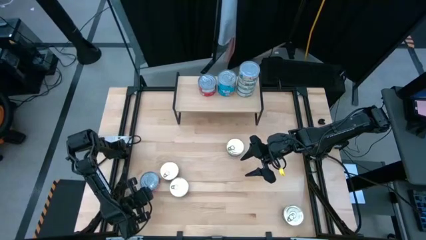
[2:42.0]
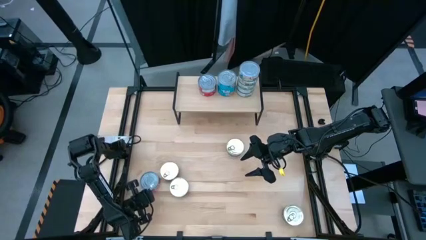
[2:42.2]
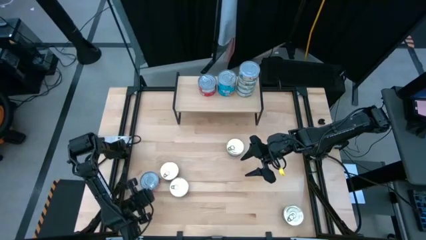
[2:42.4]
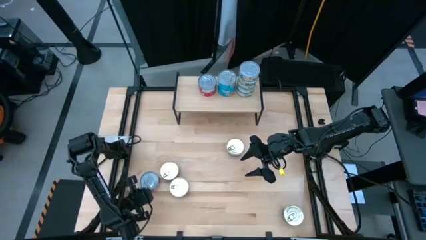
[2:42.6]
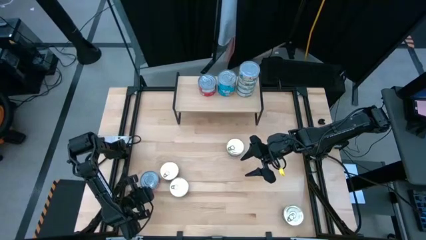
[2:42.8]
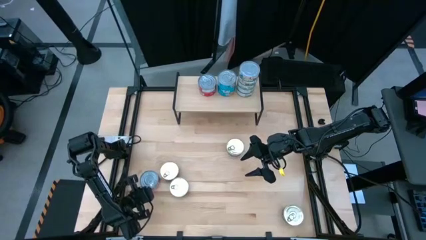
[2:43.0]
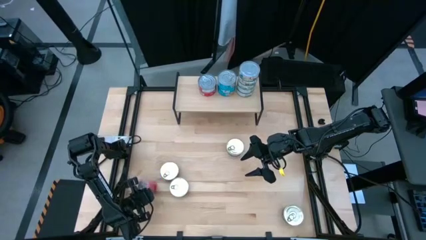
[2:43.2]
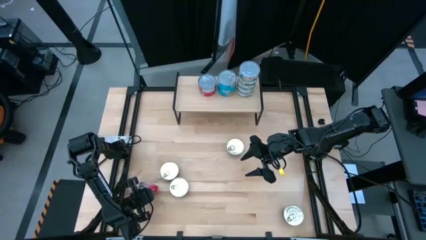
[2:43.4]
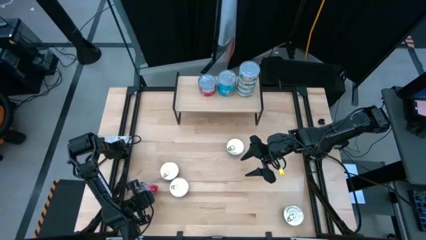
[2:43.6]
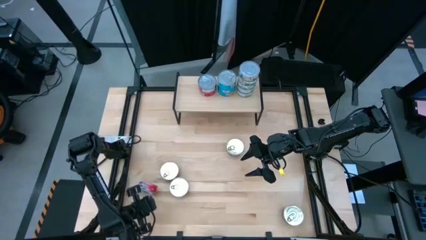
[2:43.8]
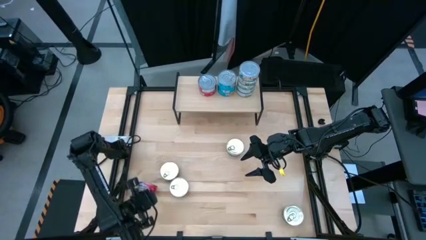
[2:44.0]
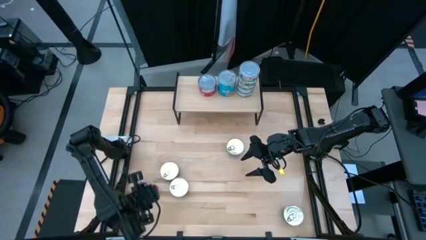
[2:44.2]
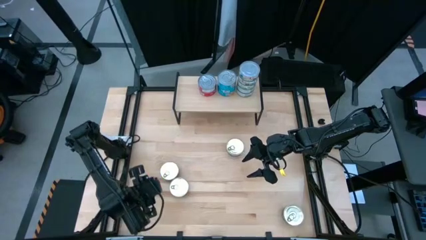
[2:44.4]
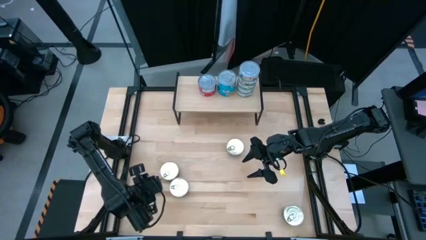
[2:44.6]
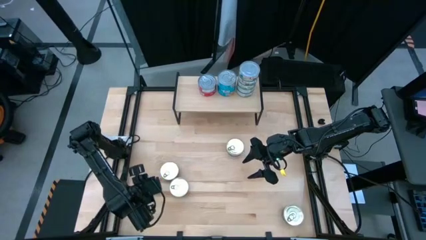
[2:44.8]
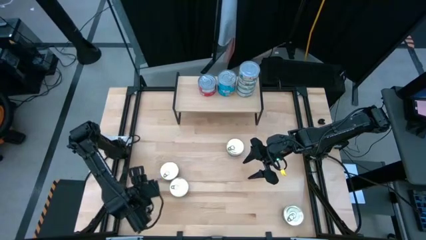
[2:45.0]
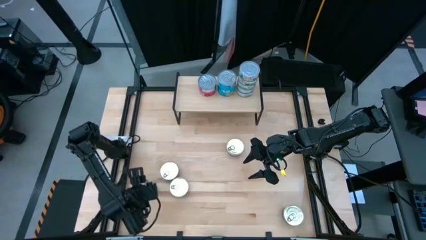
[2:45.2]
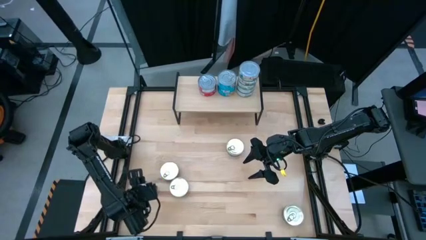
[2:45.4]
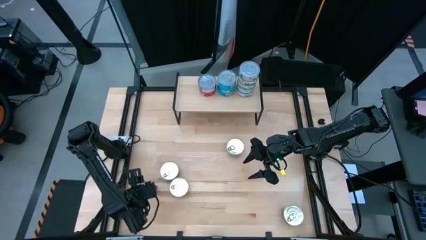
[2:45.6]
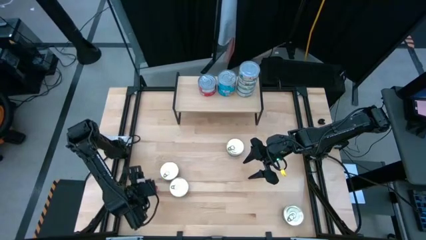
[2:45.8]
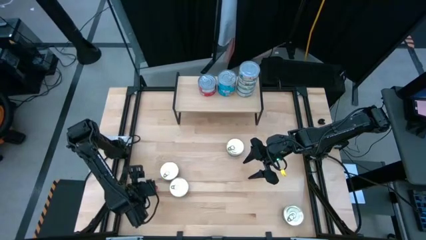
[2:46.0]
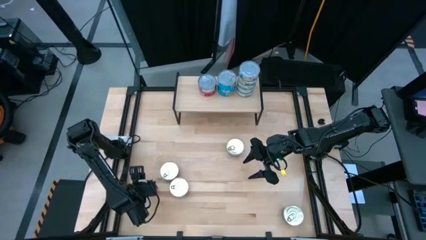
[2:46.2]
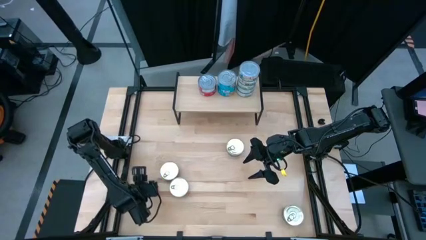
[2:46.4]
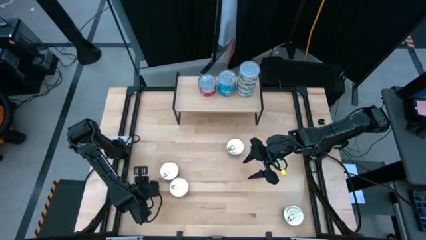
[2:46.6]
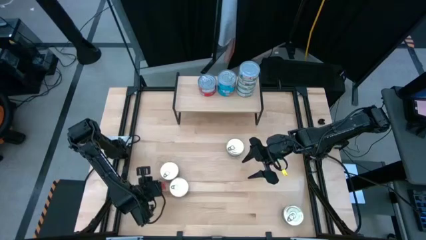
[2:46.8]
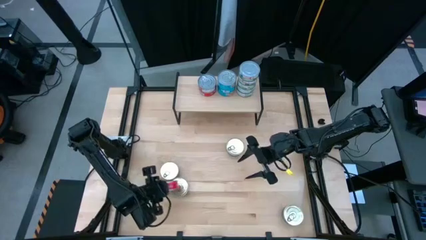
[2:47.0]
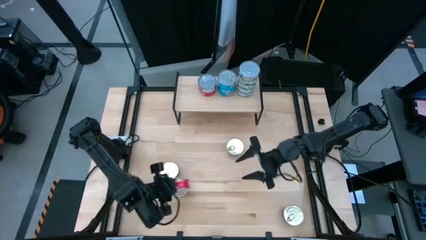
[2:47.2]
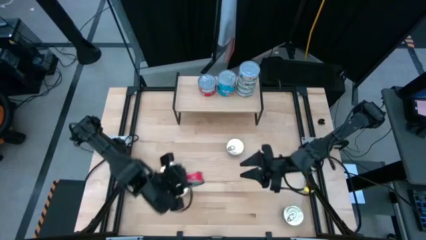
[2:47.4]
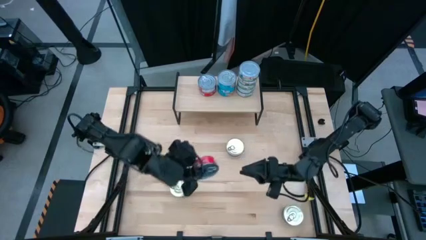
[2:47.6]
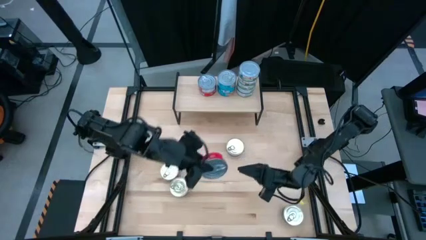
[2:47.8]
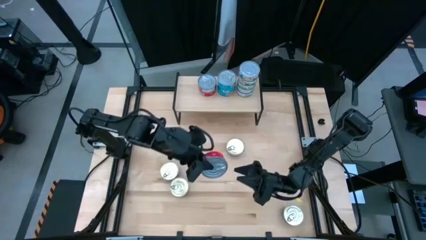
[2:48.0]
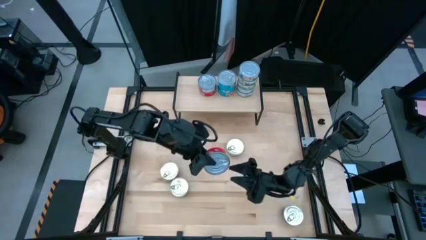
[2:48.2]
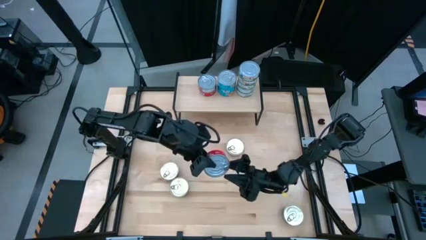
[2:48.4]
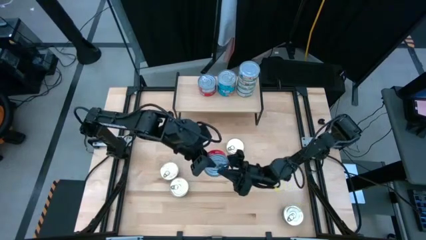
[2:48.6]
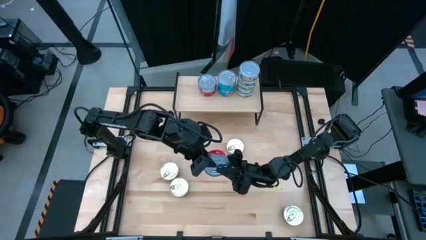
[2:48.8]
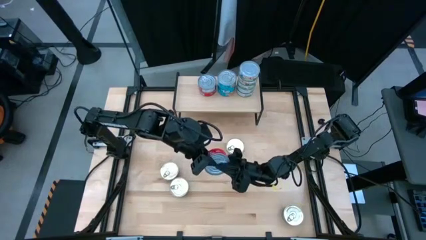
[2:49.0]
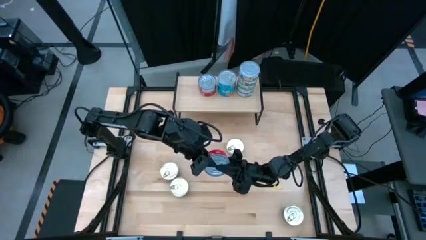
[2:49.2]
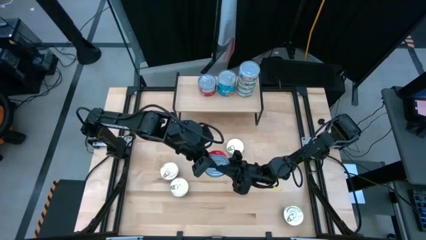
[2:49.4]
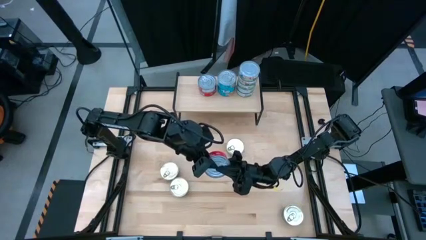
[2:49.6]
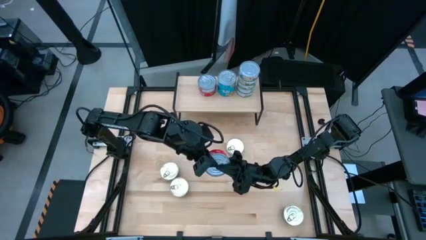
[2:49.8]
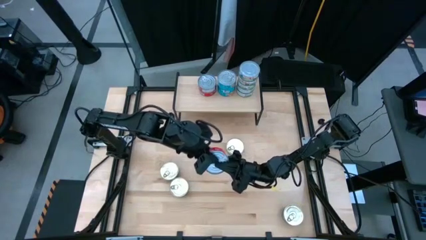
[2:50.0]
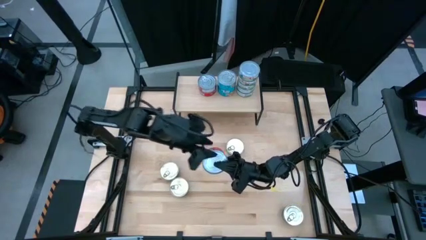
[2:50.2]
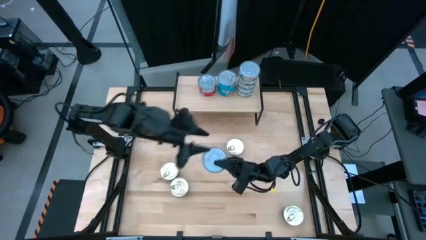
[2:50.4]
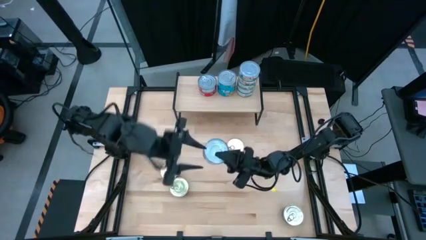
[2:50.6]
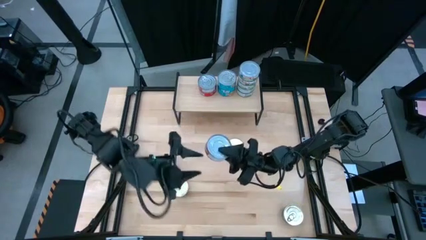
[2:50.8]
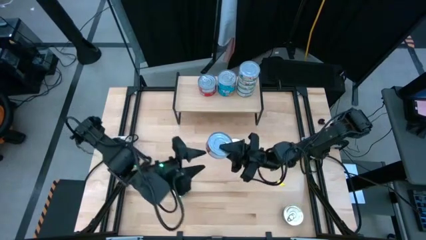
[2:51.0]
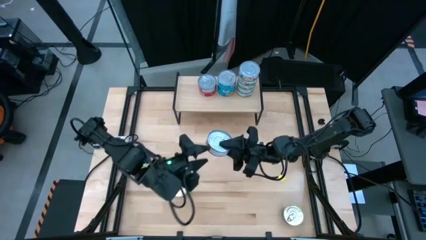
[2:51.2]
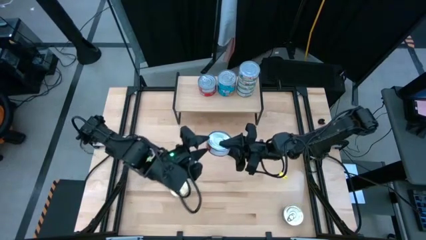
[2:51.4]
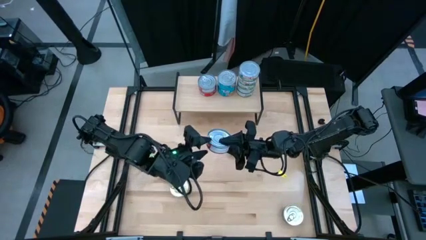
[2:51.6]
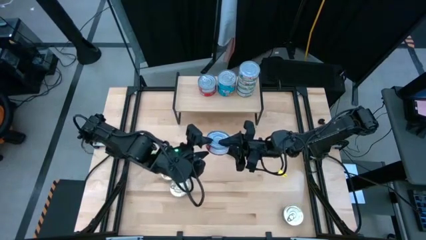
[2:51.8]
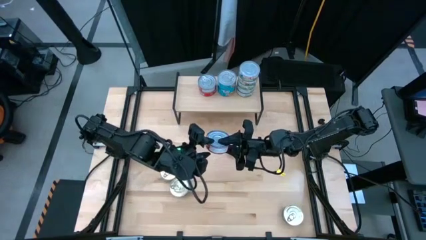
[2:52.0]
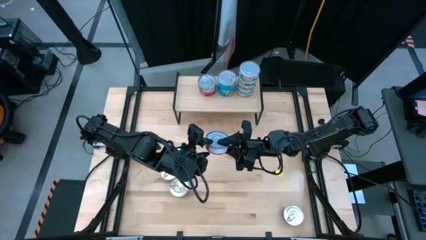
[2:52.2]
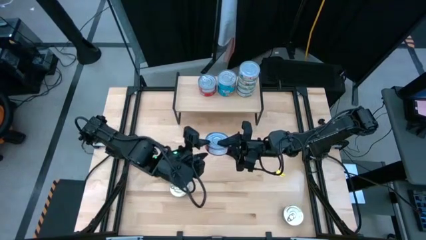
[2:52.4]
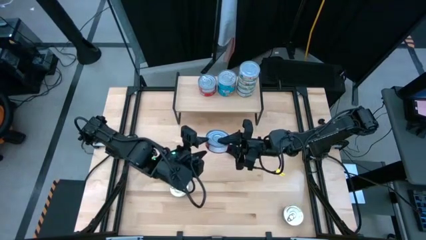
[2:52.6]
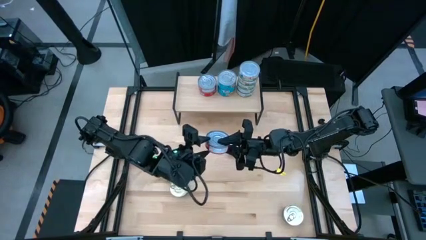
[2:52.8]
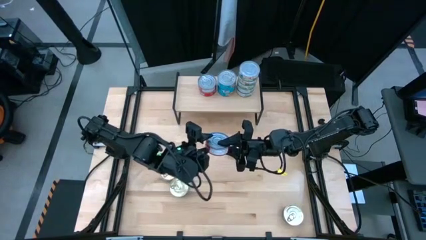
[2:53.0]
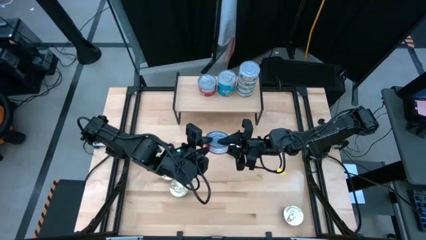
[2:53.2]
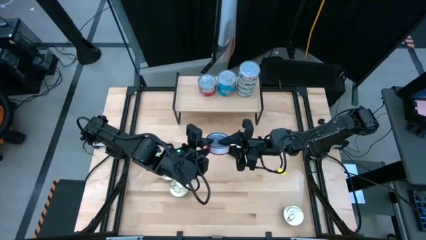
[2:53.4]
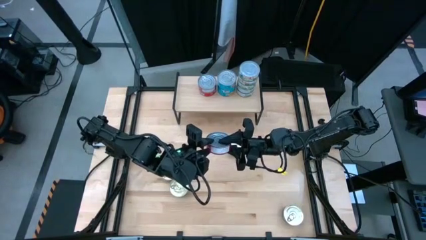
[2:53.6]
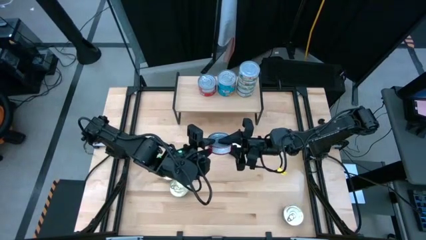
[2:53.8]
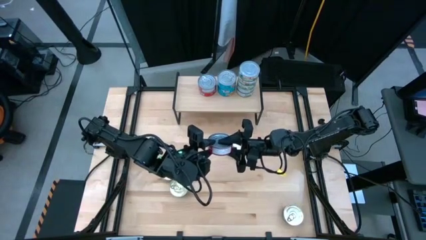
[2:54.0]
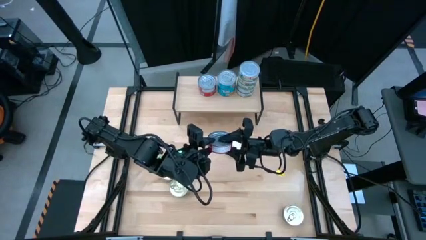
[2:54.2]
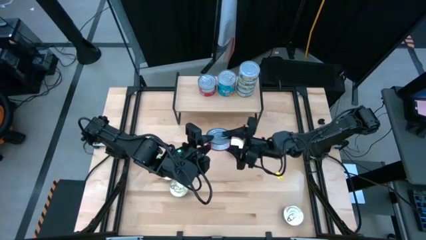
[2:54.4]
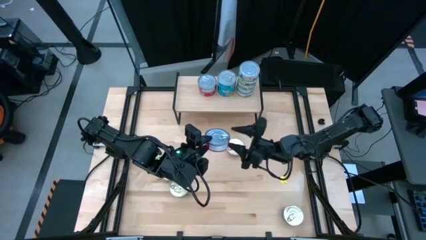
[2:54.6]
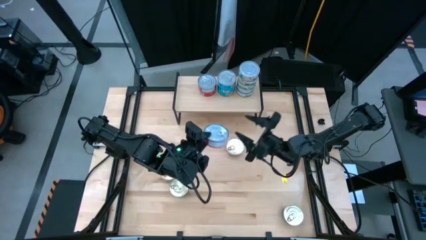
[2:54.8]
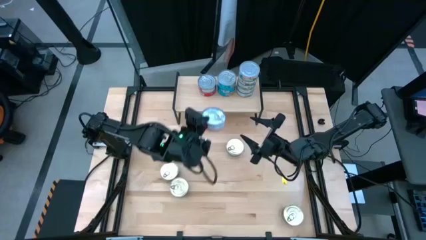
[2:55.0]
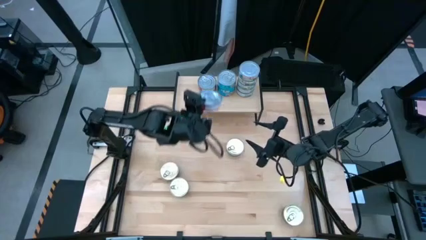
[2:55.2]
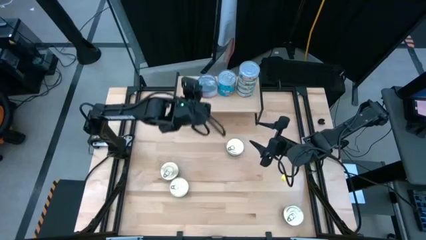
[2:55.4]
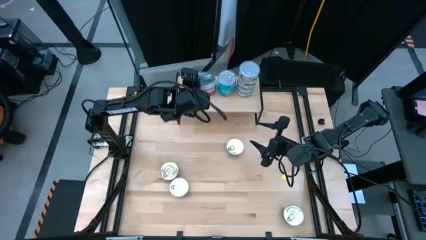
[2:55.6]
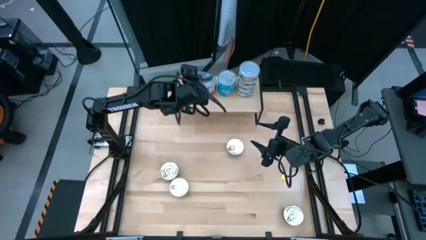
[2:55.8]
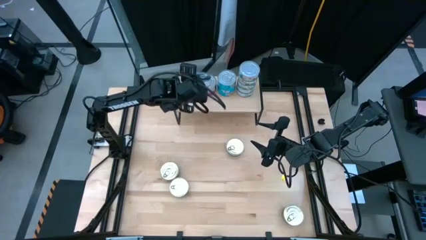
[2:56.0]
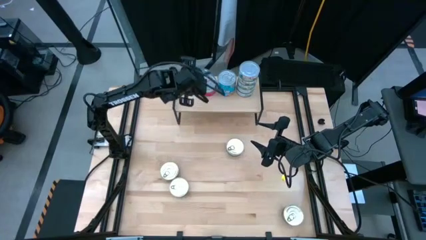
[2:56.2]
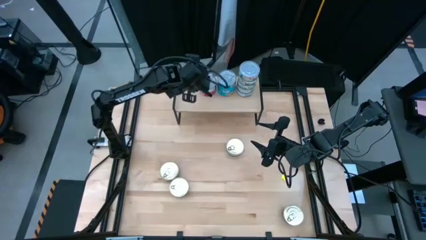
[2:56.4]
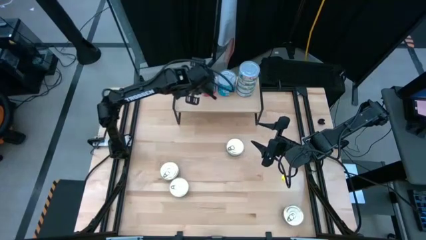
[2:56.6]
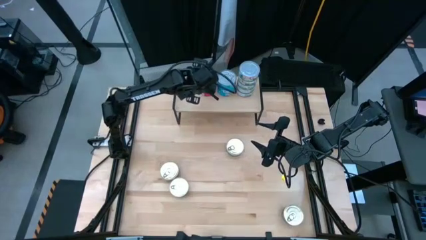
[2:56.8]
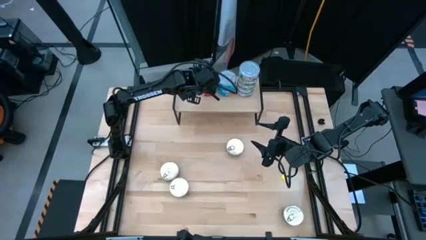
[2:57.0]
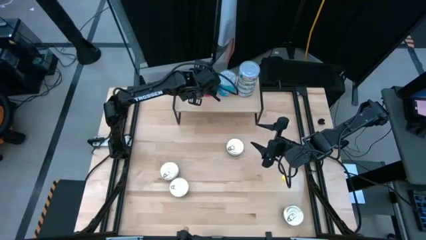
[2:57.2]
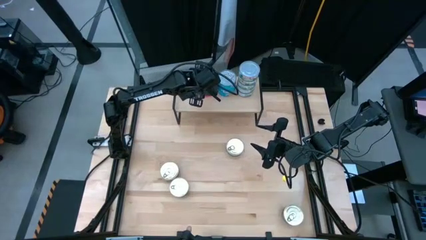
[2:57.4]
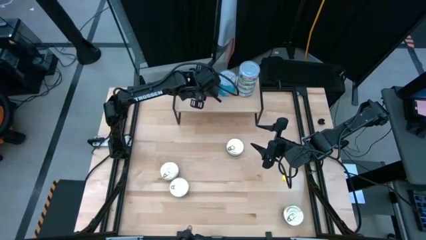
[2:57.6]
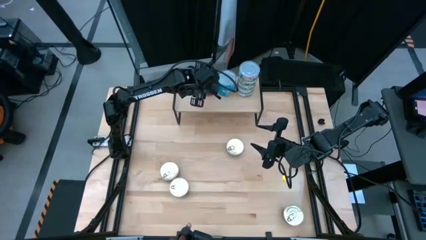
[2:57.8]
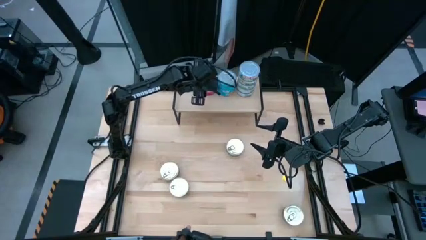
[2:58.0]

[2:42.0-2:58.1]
Task: Stack canned seafood by type on shelf
Stack the red tuna can on top of the other red tuna cans on the shelf
